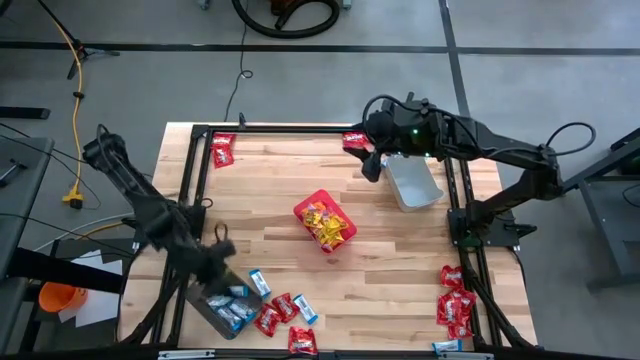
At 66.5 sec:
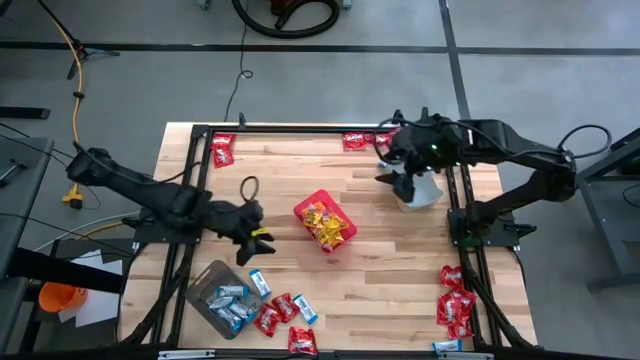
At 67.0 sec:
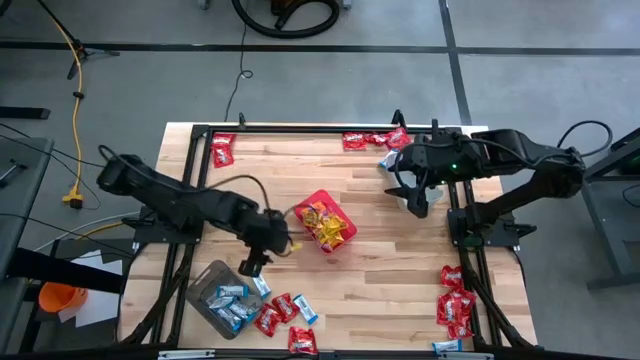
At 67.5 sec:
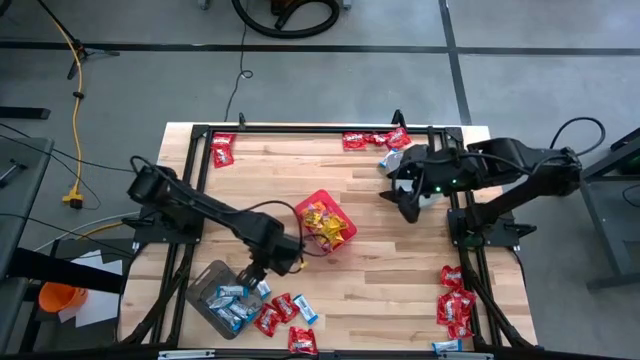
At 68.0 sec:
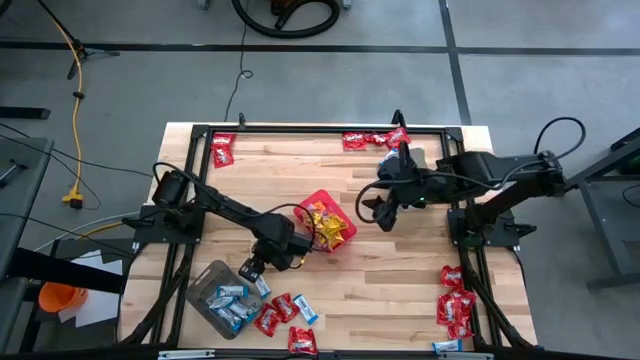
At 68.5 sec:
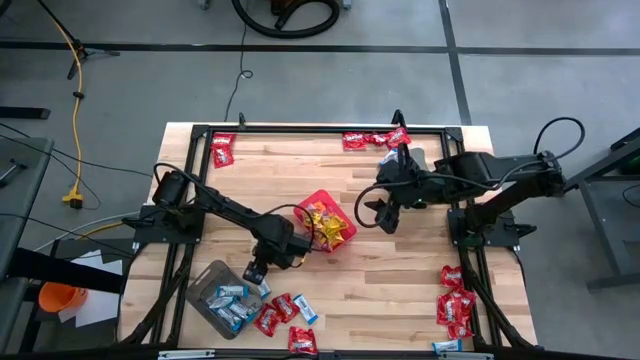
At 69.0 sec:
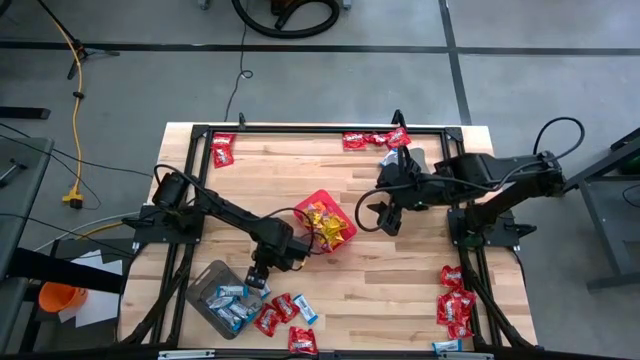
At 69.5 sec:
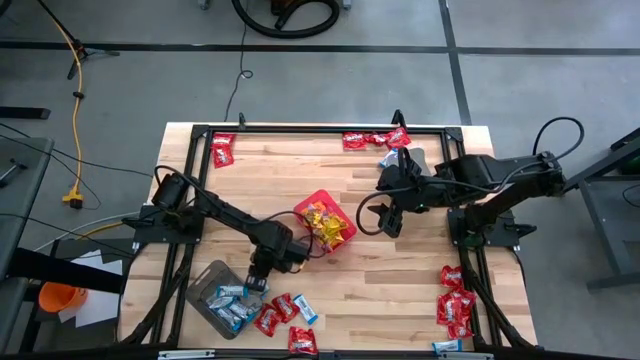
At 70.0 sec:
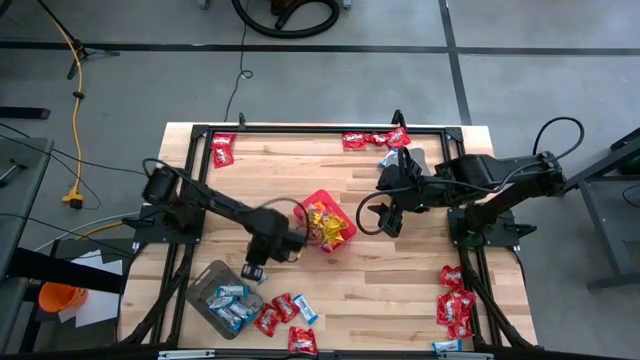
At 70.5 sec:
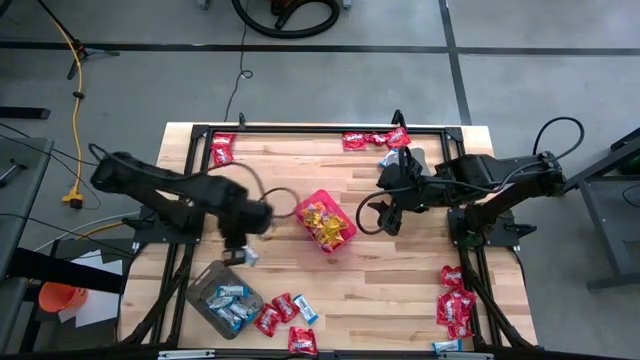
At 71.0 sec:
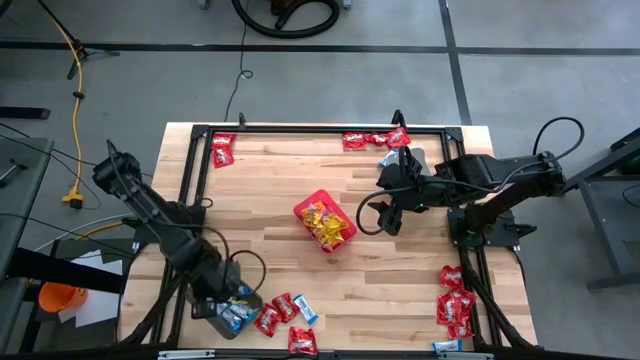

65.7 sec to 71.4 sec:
Task: Sort candy
Put the blue candy into the black bin

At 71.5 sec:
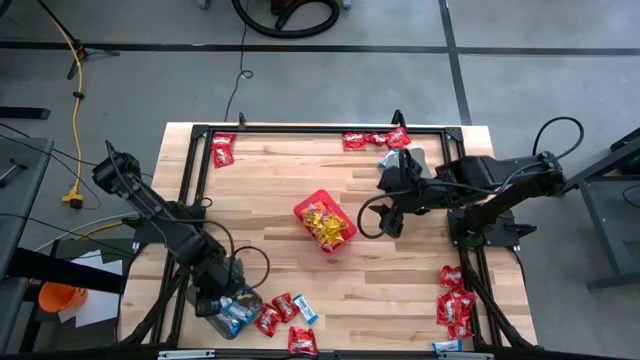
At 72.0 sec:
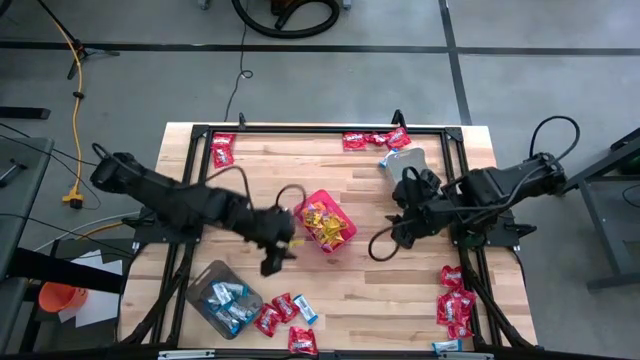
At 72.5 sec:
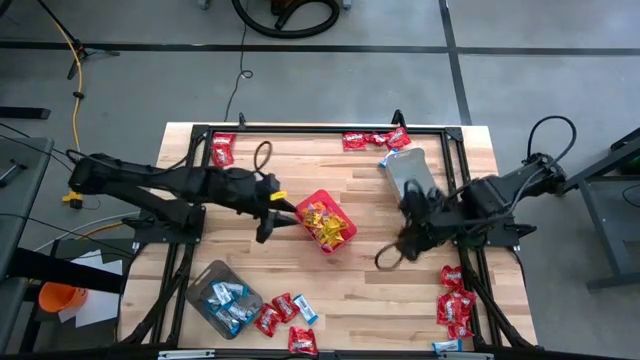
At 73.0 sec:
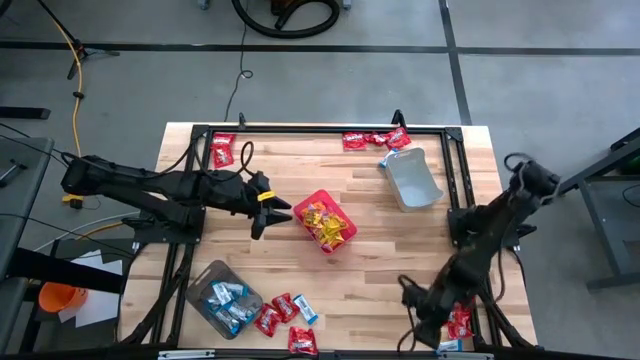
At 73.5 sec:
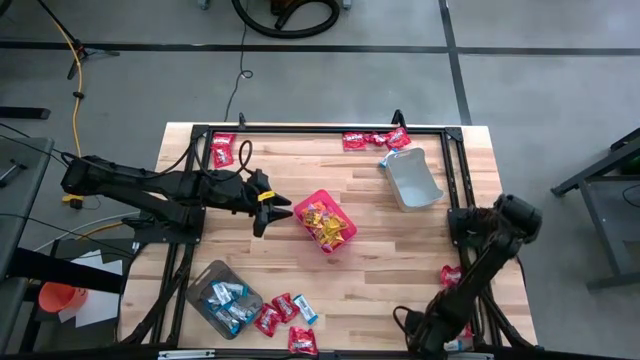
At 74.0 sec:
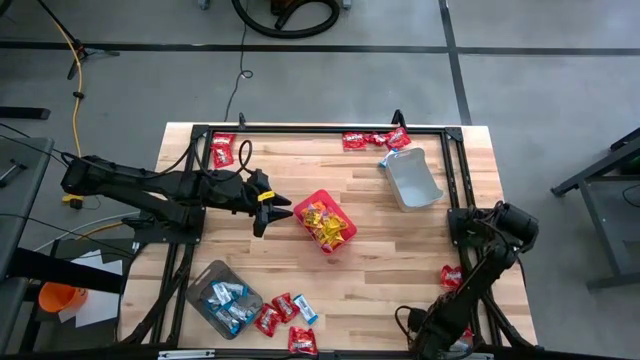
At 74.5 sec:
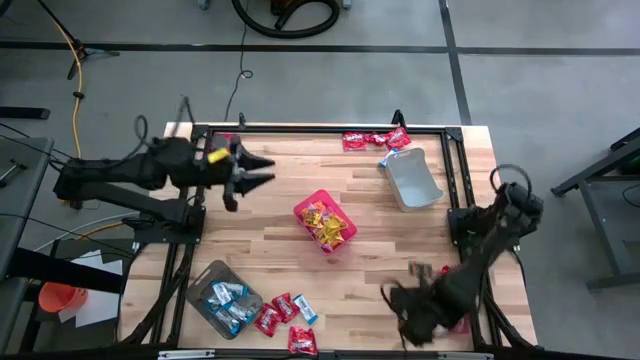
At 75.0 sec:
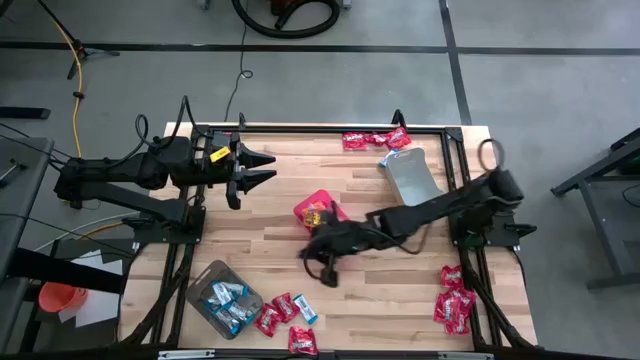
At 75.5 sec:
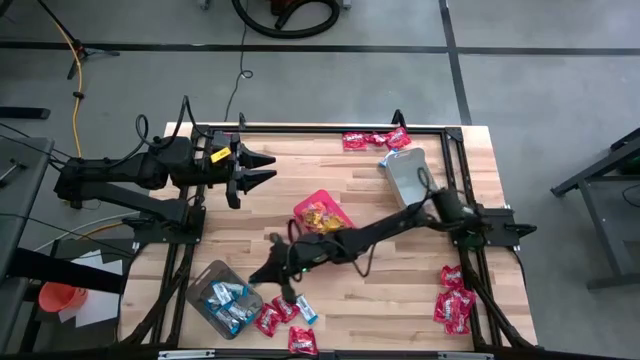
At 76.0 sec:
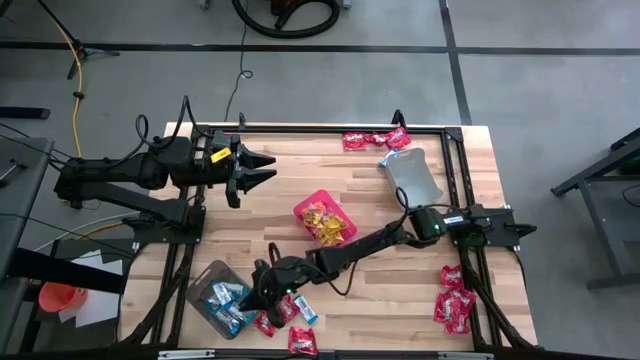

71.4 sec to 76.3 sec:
Put the blue candy into the black bin

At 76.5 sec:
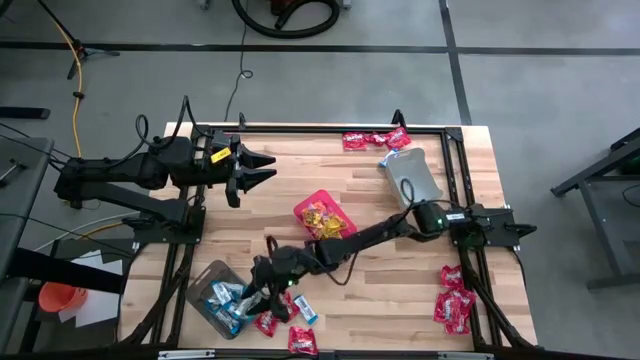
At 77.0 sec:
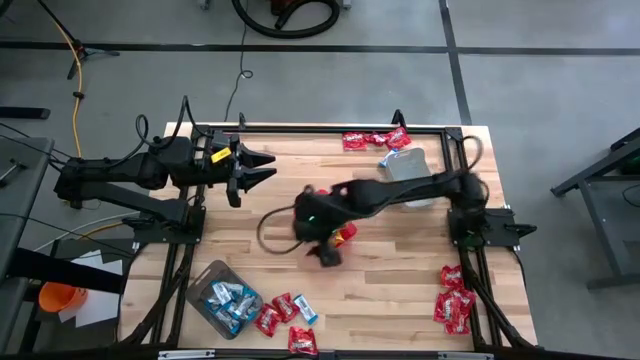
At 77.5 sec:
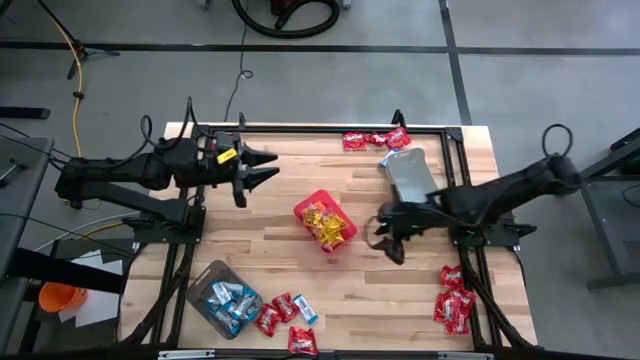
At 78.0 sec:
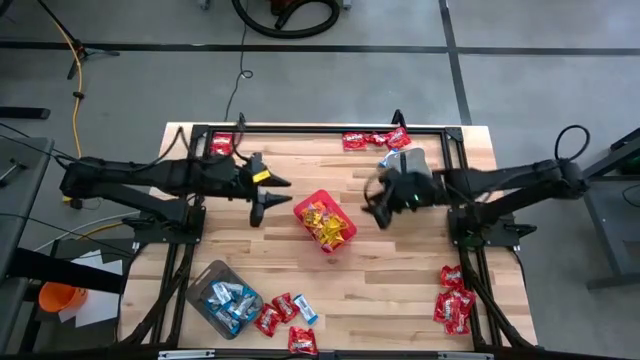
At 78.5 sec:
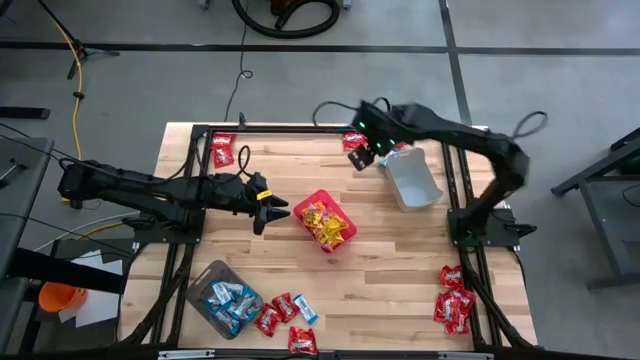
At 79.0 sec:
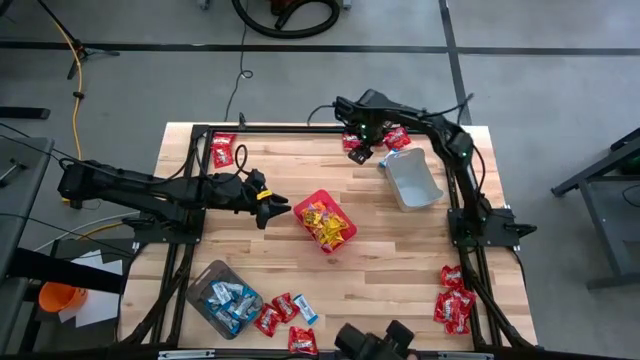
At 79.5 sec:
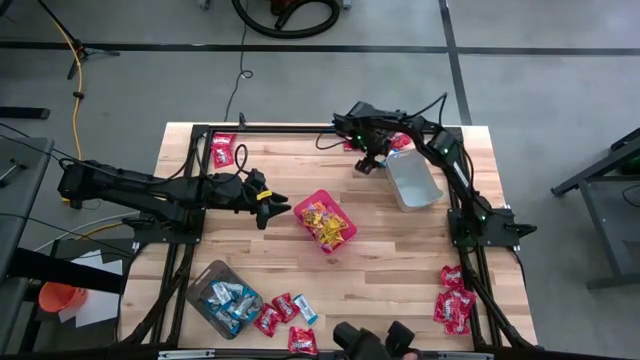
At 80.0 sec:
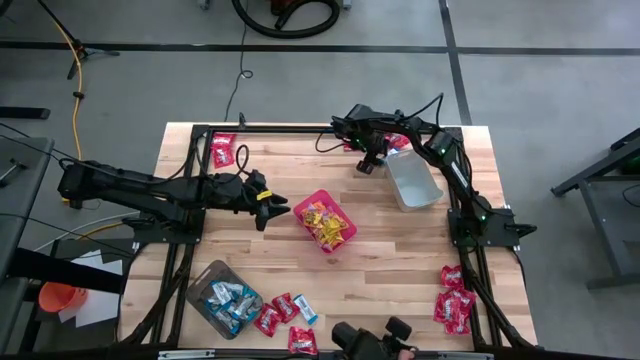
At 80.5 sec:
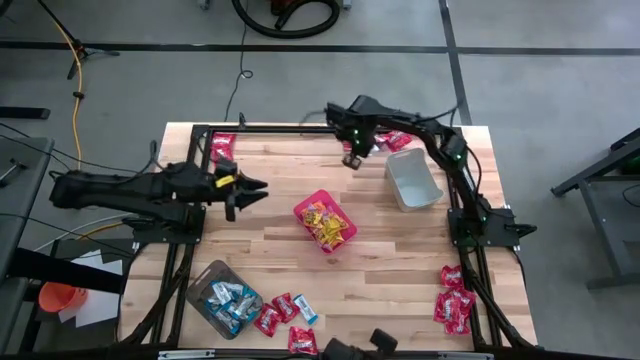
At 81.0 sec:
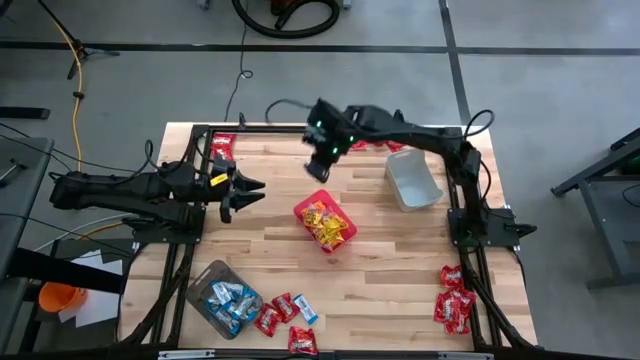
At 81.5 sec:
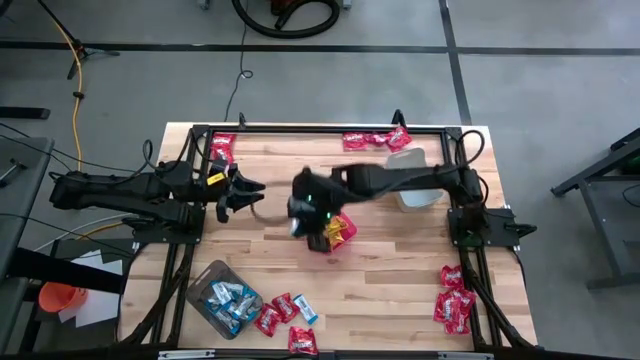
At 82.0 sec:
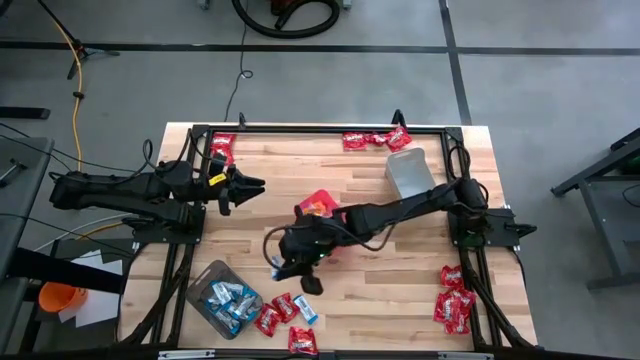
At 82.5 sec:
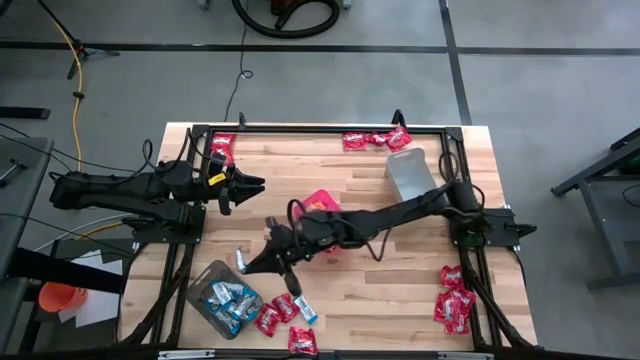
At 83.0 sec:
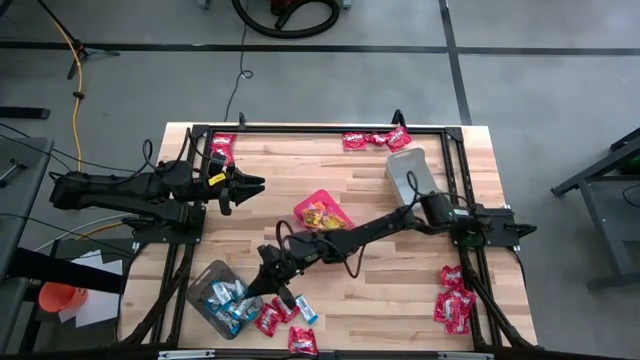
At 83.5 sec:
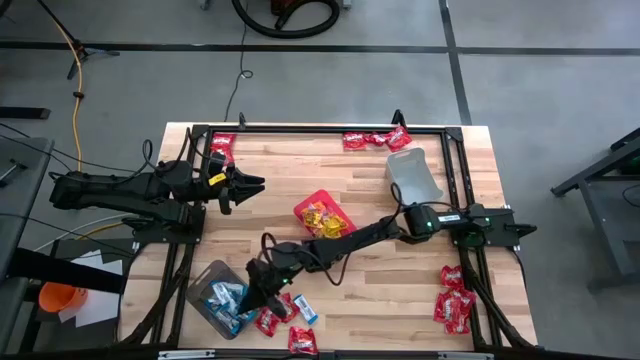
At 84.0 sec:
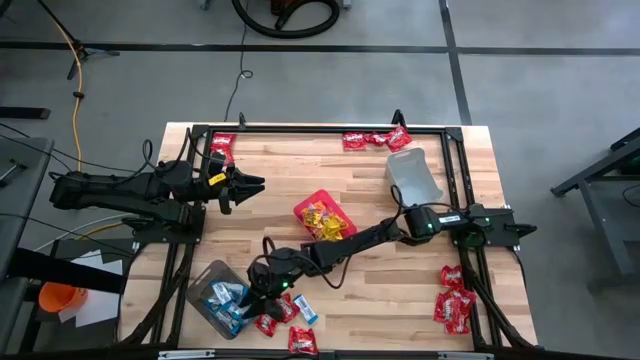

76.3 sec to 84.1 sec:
Put the blue candy into the black bin

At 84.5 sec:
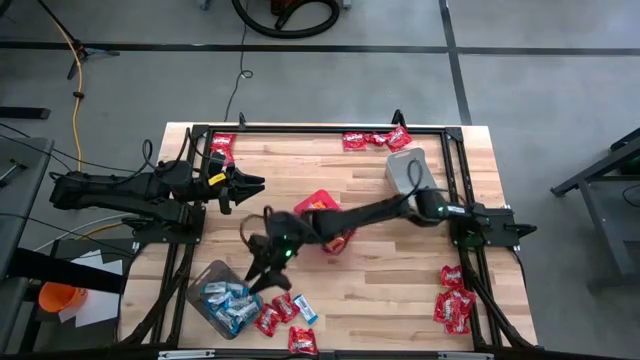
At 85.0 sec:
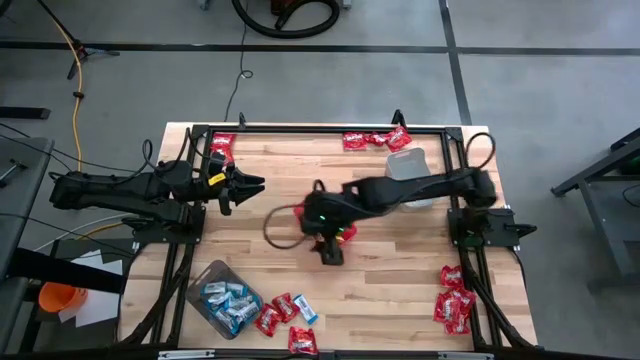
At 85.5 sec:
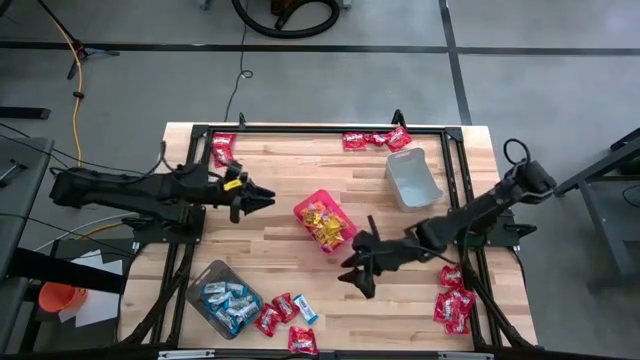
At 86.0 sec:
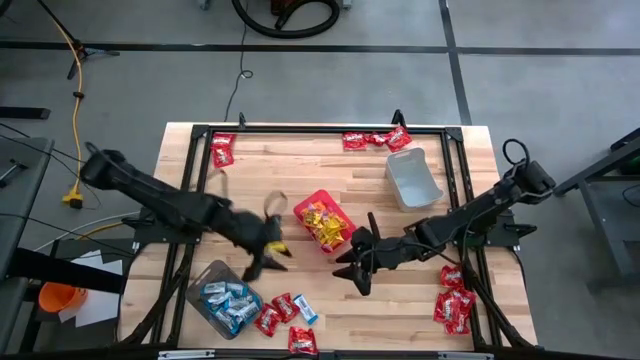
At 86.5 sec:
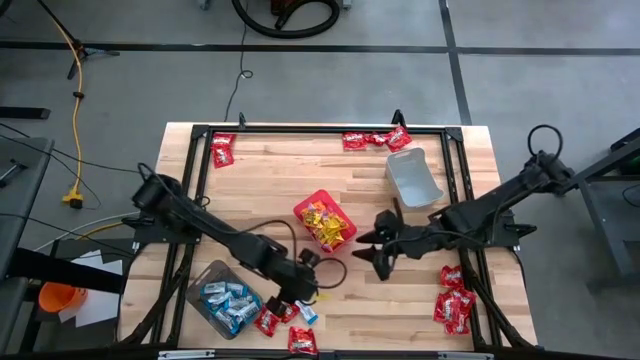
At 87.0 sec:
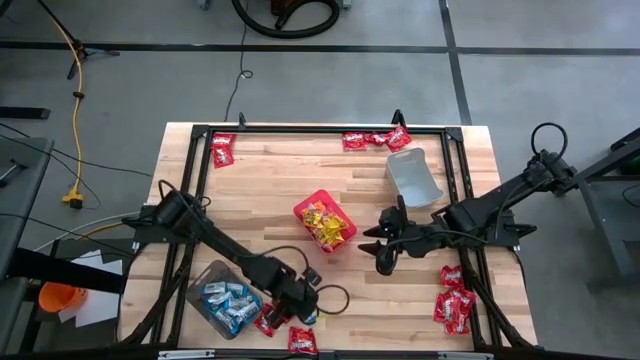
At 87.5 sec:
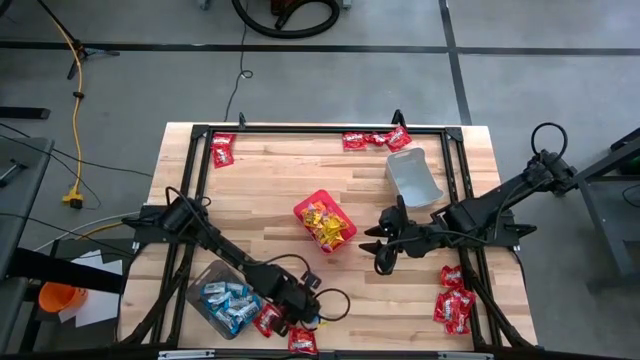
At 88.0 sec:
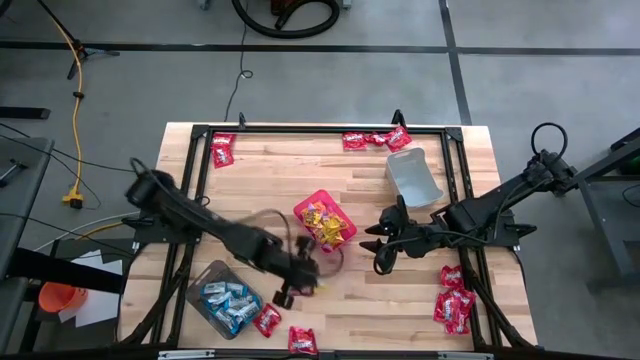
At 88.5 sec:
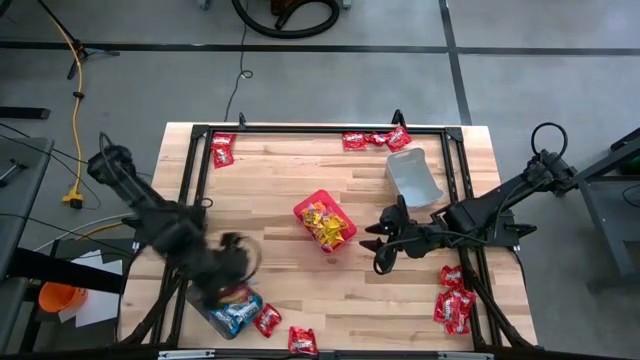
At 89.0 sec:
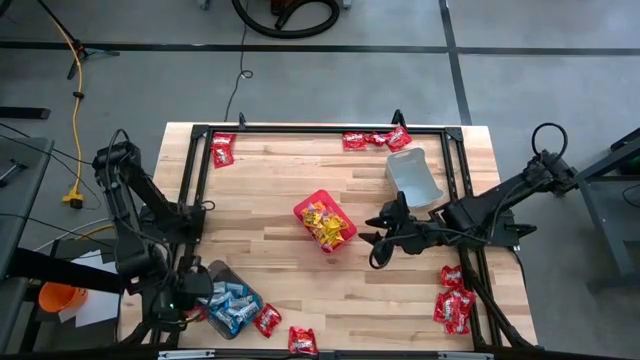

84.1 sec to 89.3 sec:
Put the blue candy into the black bin
